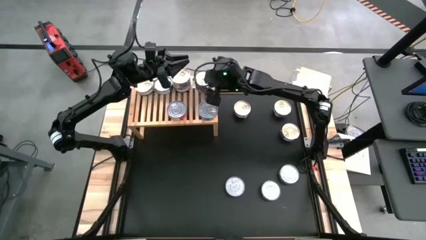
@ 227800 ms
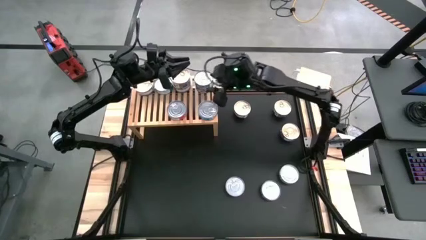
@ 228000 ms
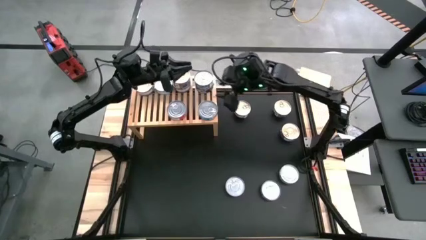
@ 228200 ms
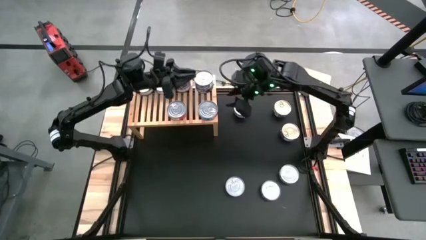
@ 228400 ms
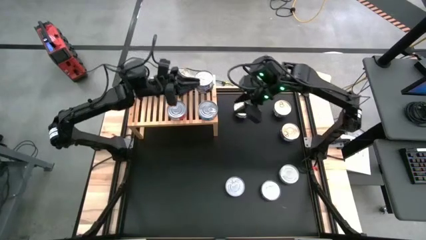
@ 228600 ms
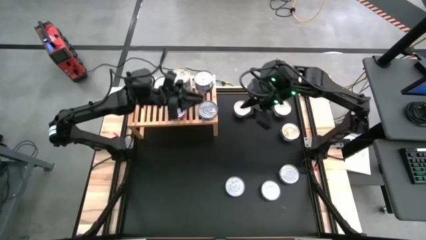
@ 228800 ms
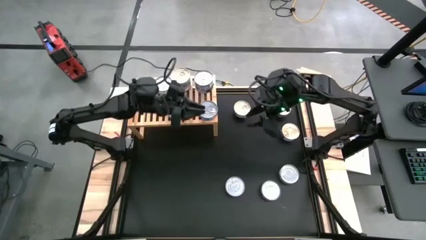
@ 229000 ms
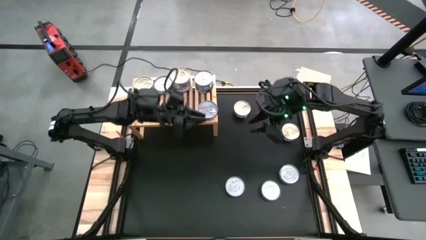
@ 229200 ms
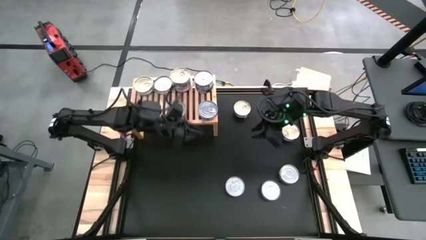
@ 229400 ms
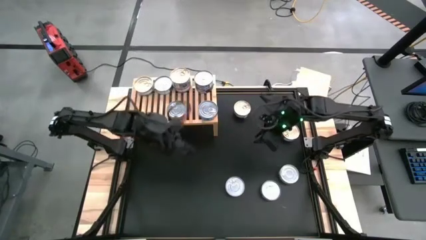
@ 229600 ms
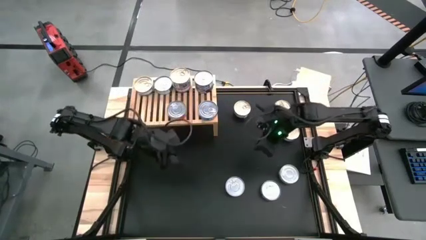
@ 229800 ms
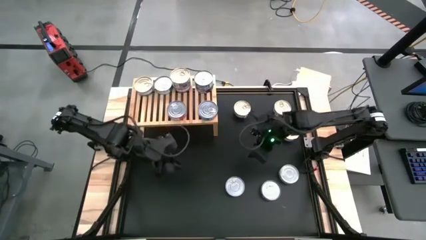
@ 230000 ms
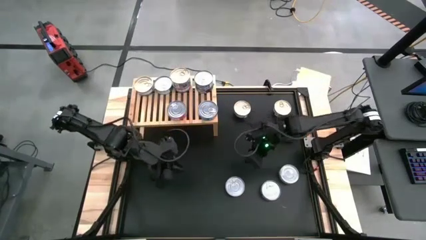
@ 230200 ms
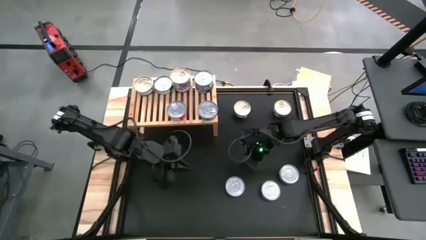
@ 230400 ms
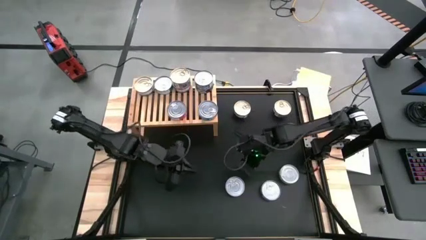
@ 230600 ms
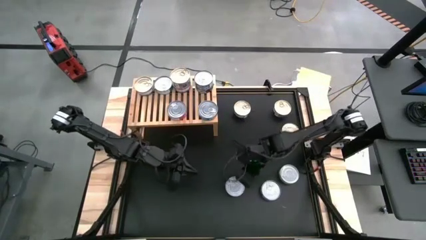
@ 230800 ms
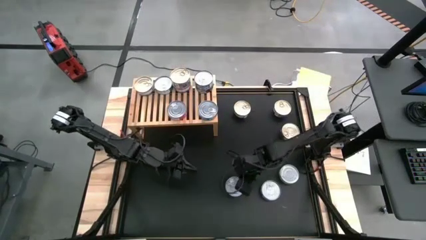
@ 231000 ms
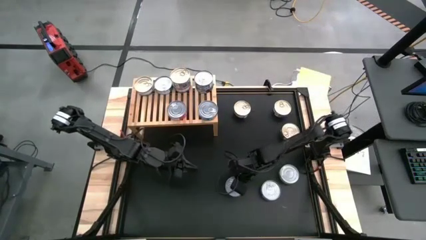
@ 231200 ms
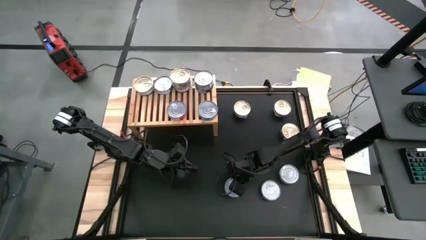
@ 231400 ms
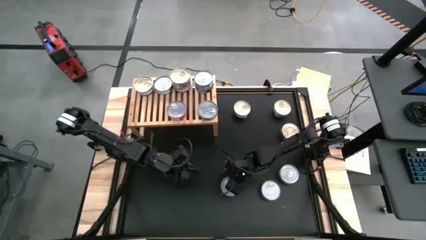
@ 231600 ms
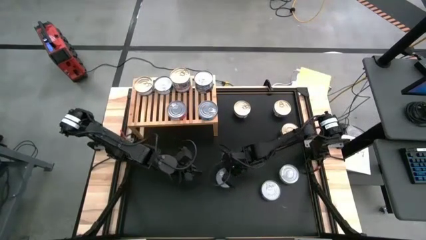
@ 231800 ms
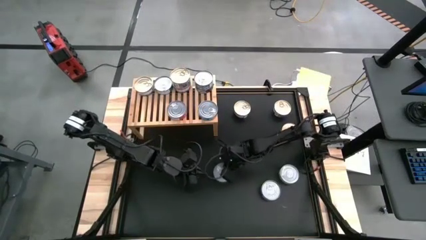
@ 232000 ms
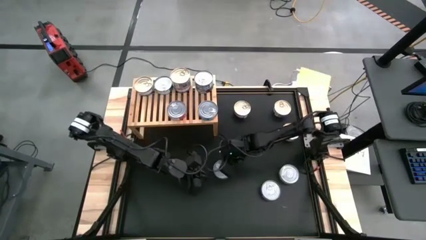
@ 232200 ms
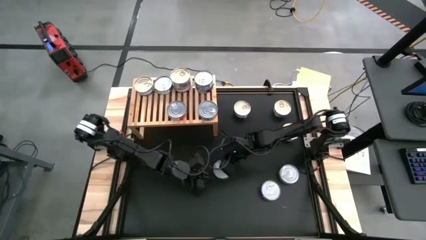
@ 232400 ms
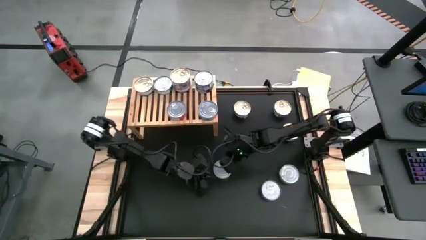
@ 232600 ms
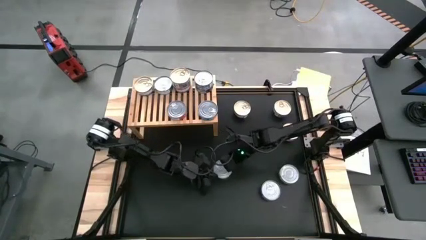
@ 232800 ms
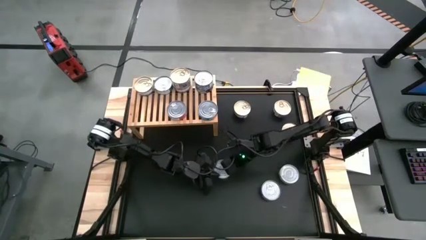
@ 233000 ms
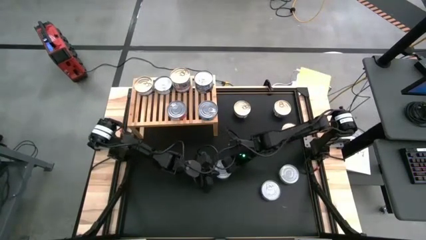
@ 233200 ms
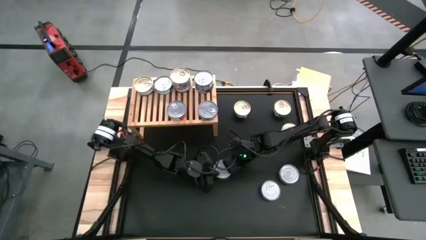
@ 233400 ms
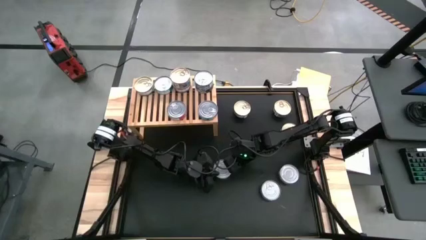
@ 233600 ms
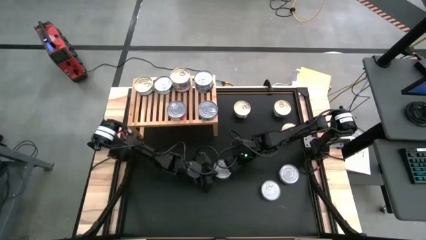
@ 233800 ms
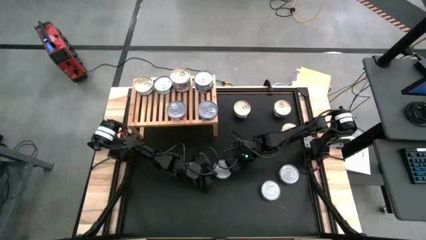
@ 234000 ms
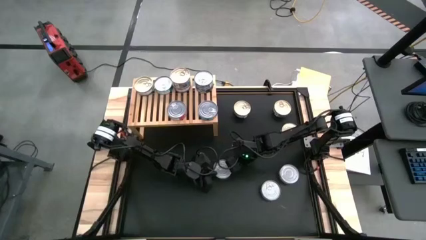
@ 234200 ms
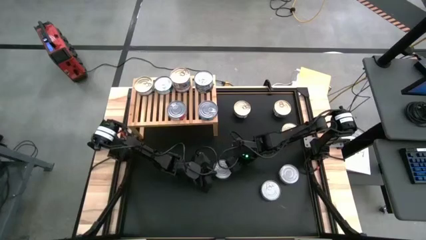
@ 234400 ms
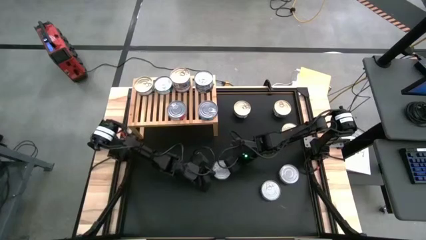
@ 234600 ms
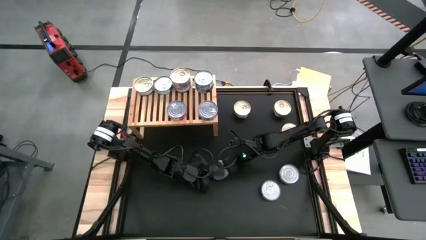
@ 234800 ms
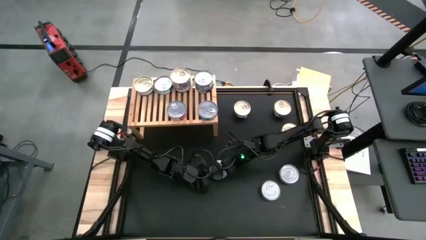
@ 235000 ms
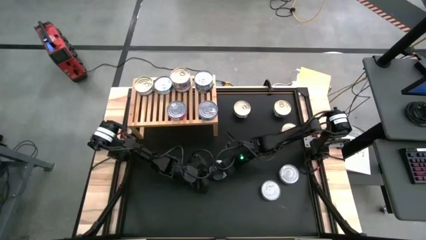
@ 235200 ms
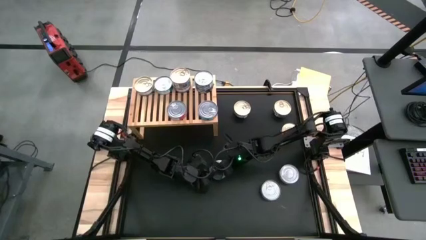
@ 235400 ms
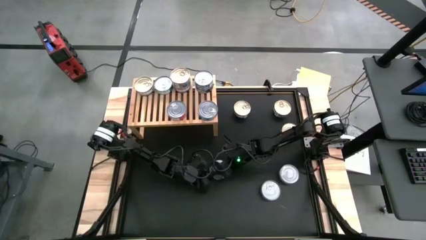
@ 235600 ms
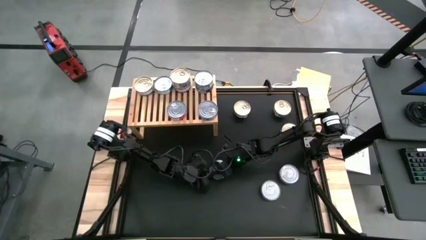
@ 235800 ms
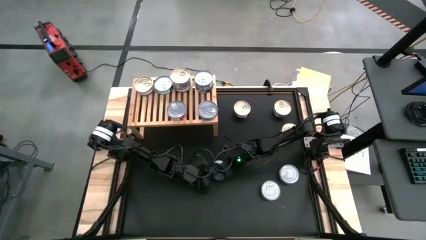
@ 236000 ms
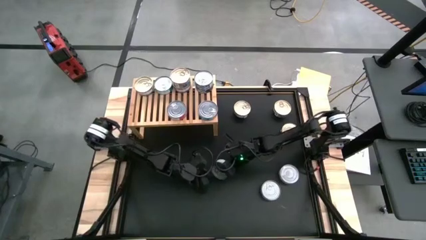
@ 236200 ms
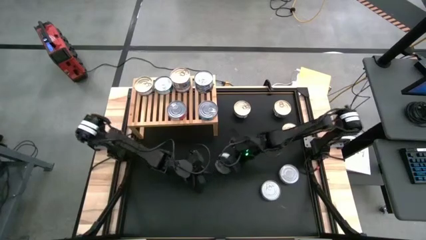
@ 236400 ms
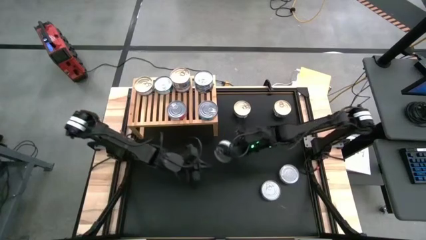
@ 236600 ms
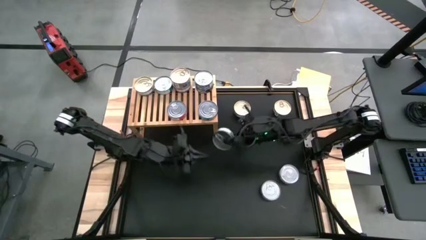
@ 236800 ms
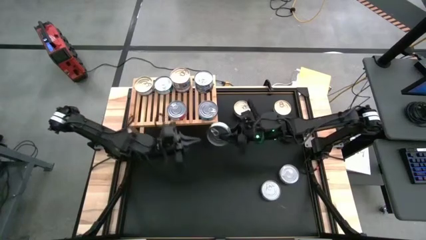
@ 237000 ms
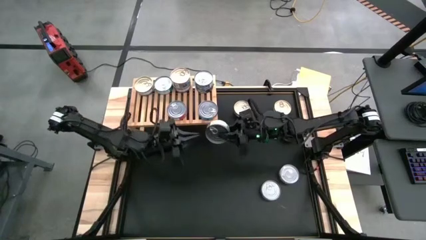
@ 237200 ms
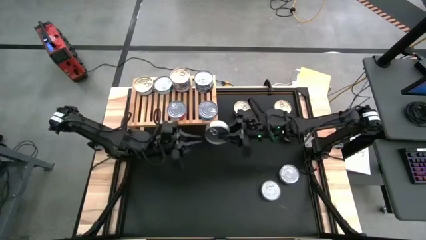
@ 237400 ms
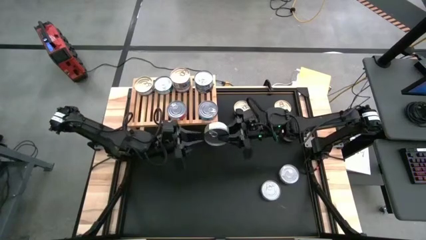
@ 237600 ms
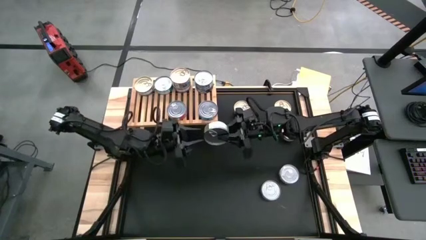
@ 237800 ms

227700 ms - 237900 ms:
Task: Stack canned seafood by type on shelf
Put the left green tuna can on the shelf
